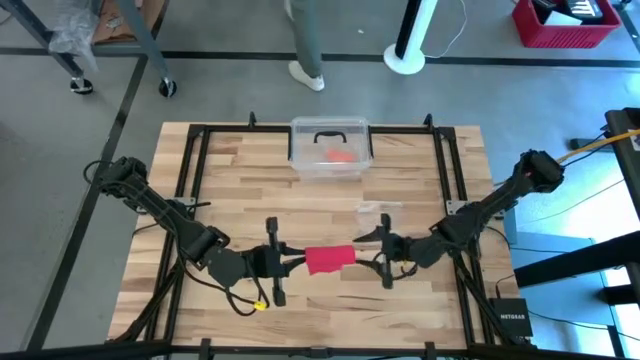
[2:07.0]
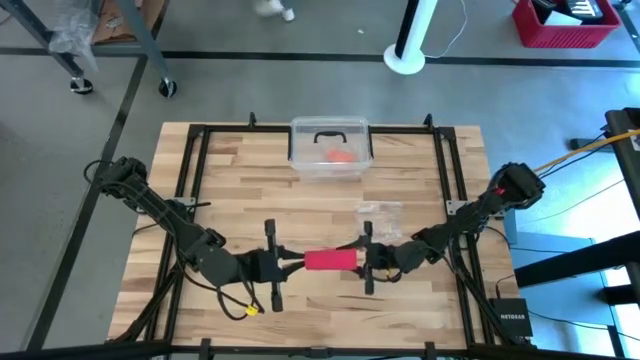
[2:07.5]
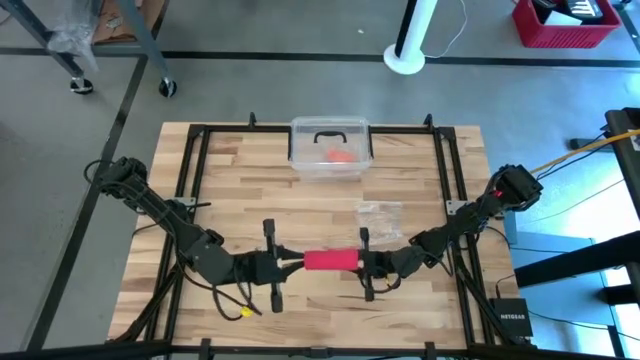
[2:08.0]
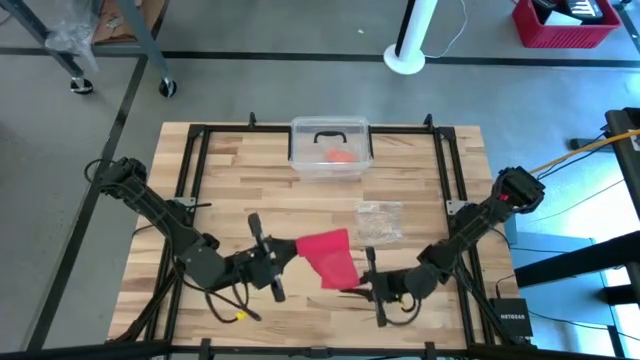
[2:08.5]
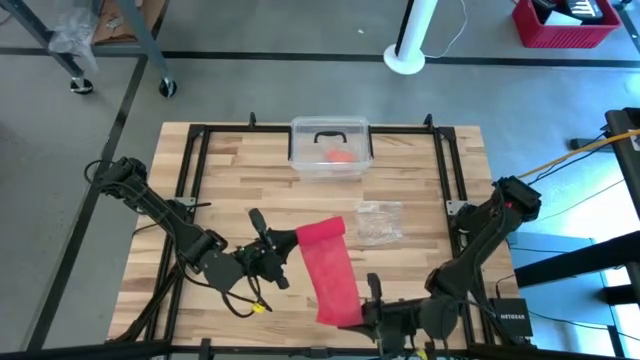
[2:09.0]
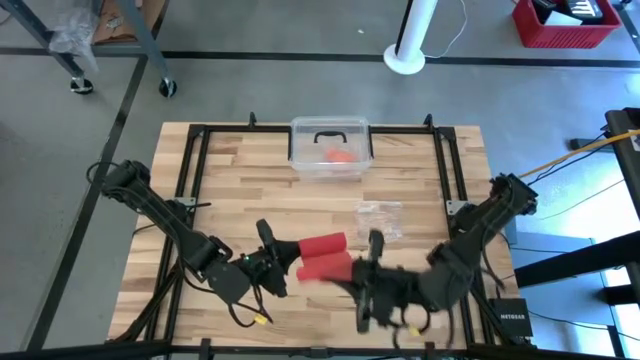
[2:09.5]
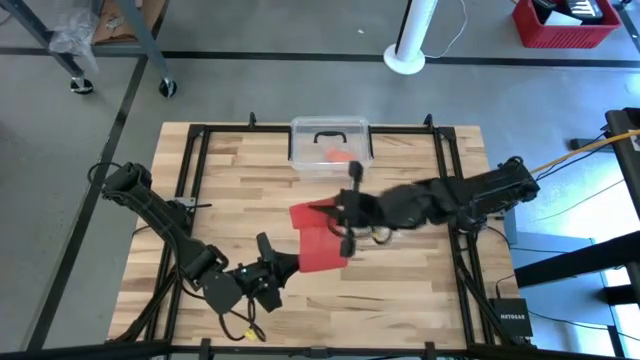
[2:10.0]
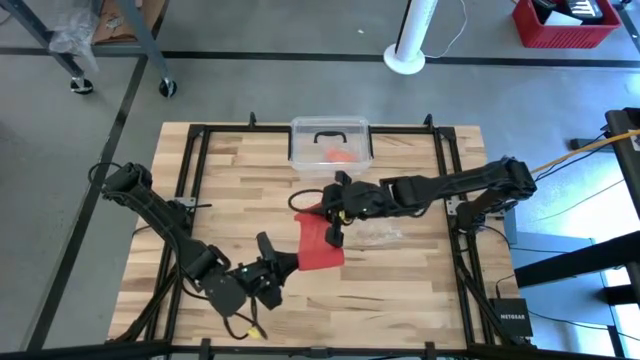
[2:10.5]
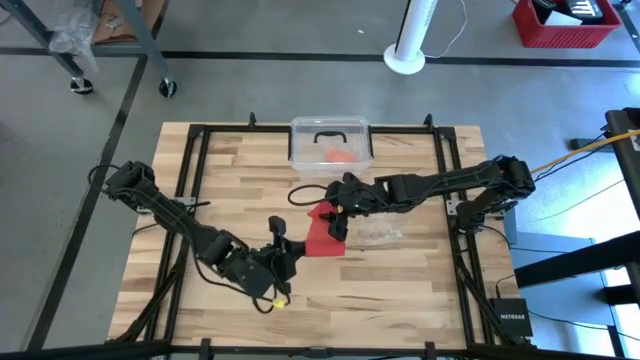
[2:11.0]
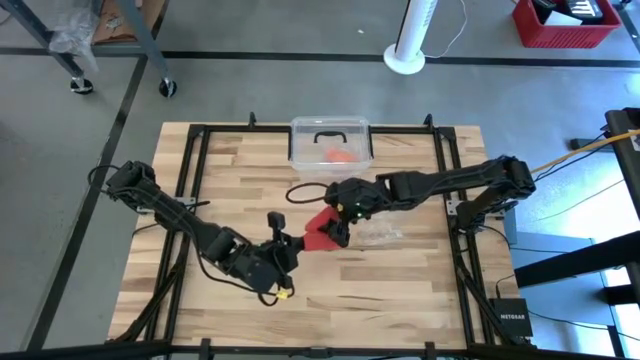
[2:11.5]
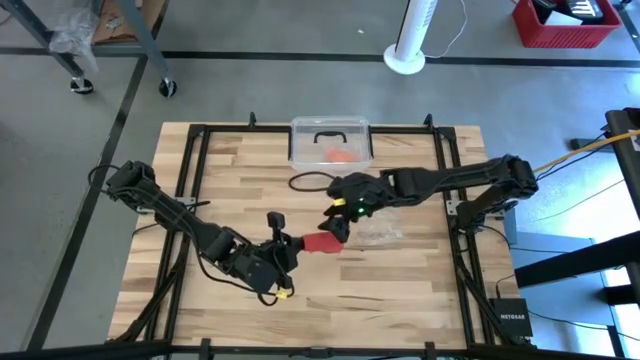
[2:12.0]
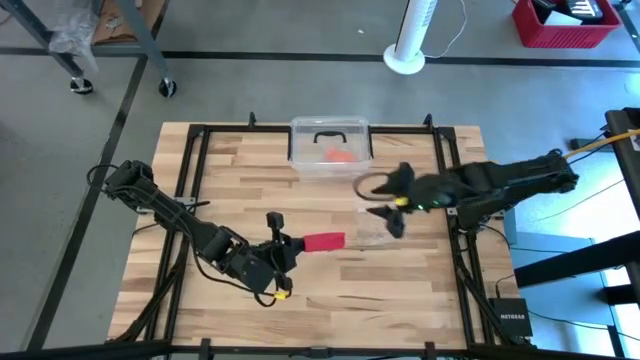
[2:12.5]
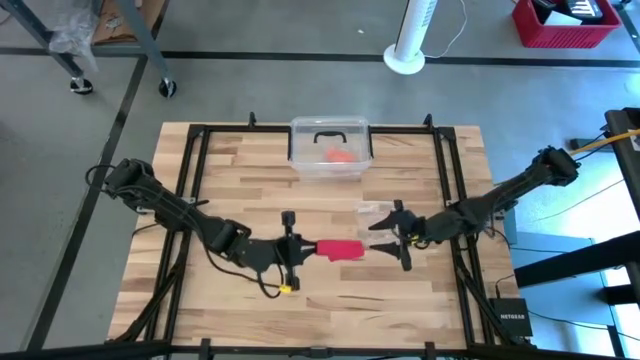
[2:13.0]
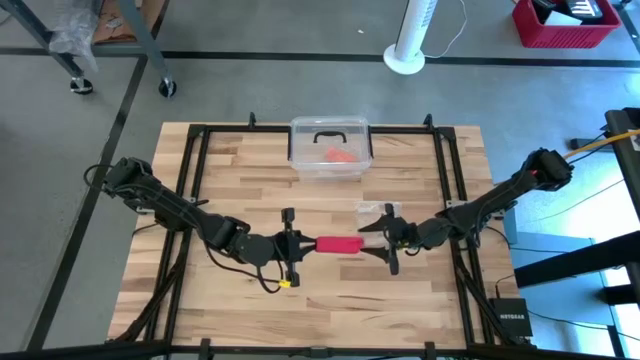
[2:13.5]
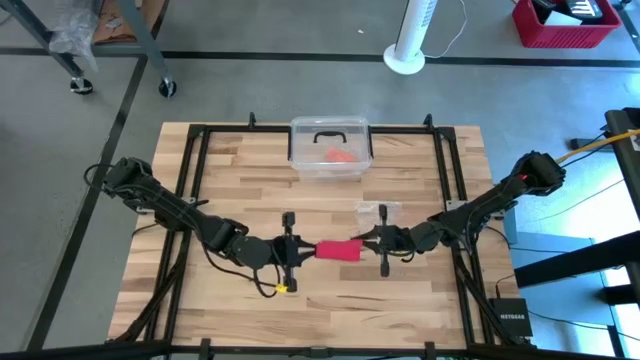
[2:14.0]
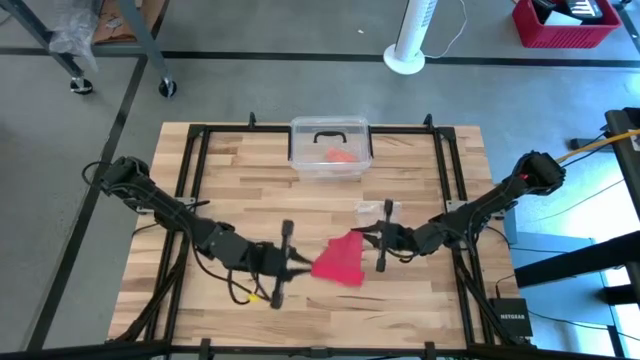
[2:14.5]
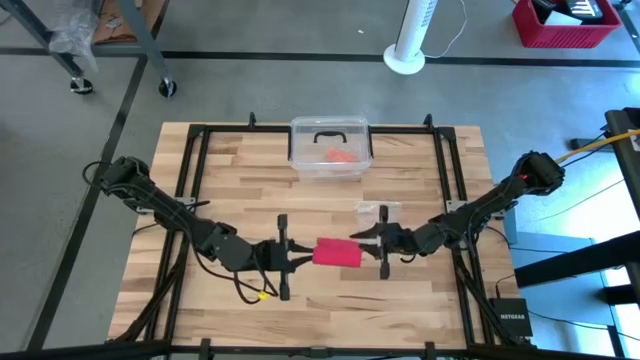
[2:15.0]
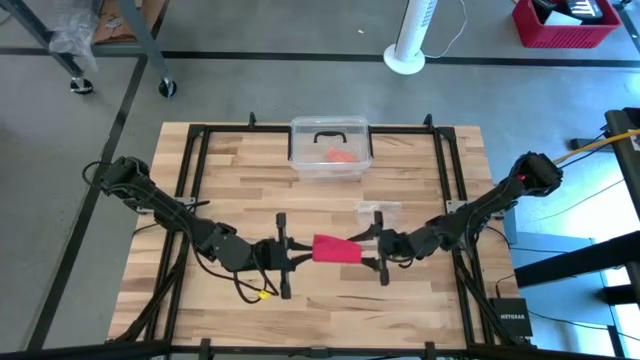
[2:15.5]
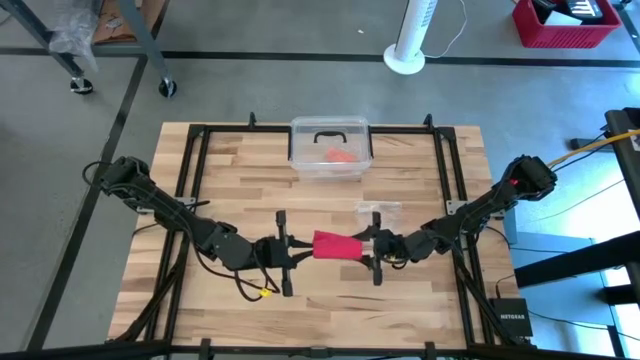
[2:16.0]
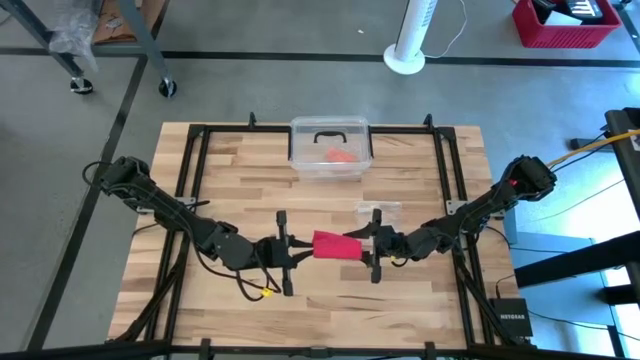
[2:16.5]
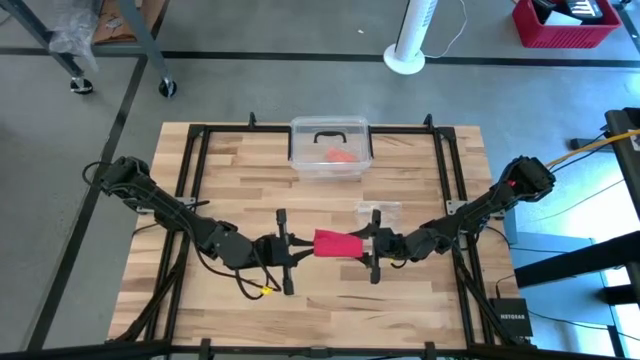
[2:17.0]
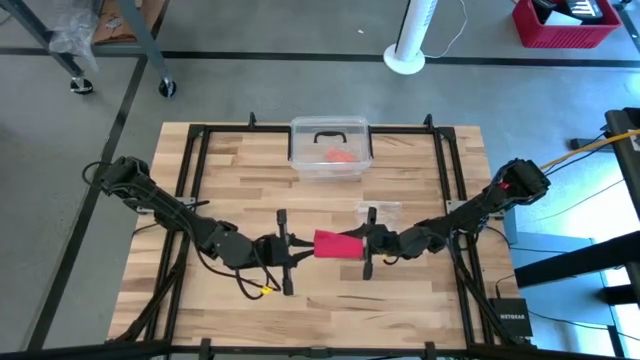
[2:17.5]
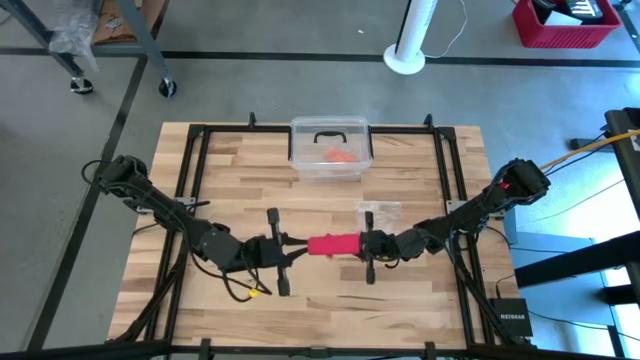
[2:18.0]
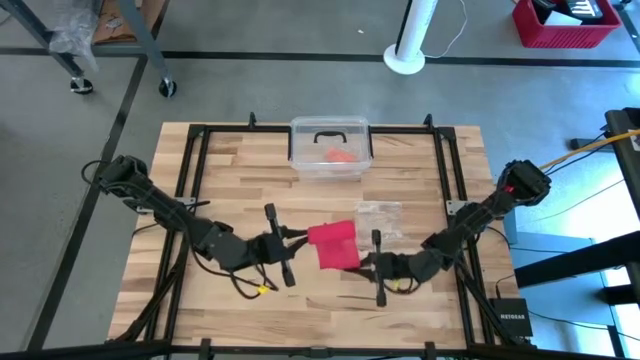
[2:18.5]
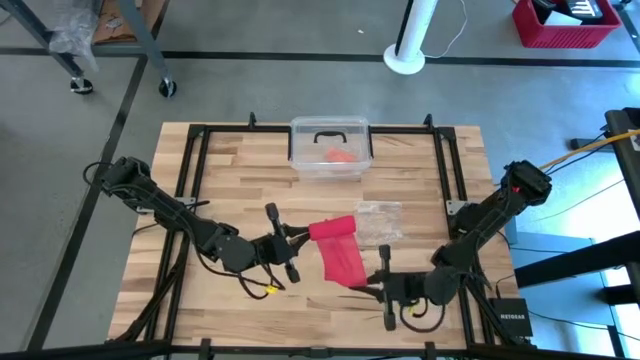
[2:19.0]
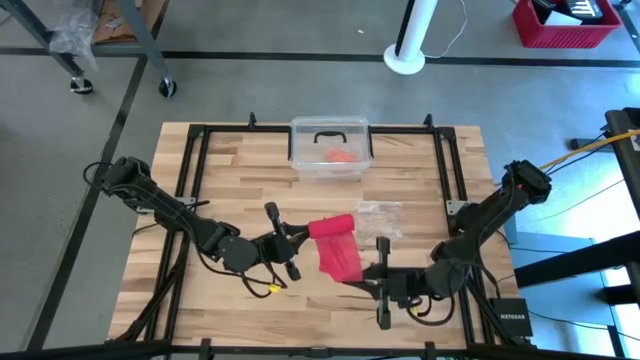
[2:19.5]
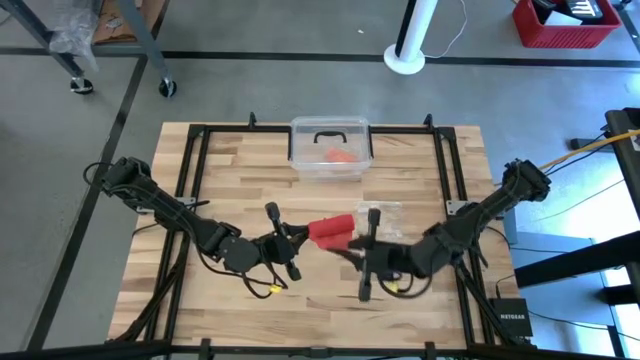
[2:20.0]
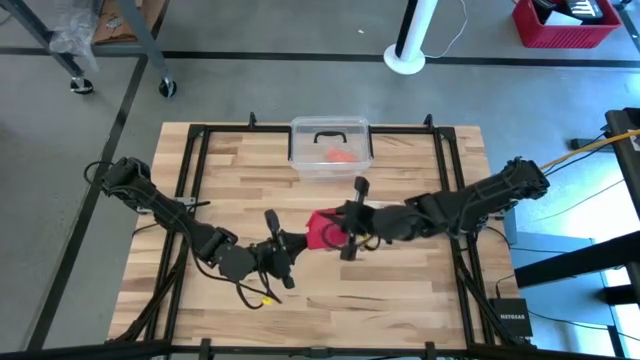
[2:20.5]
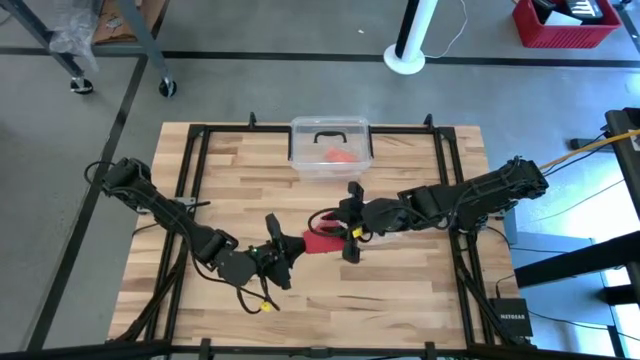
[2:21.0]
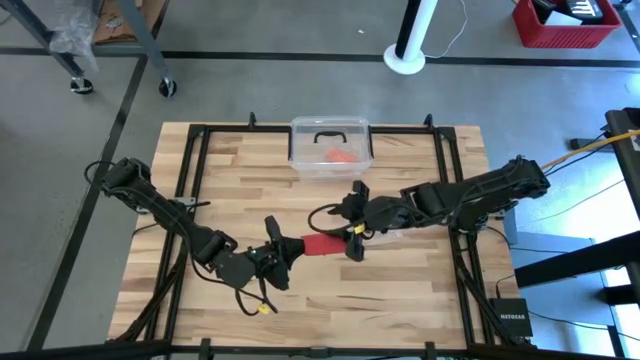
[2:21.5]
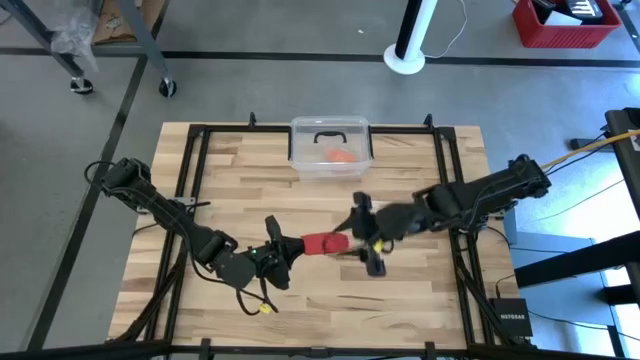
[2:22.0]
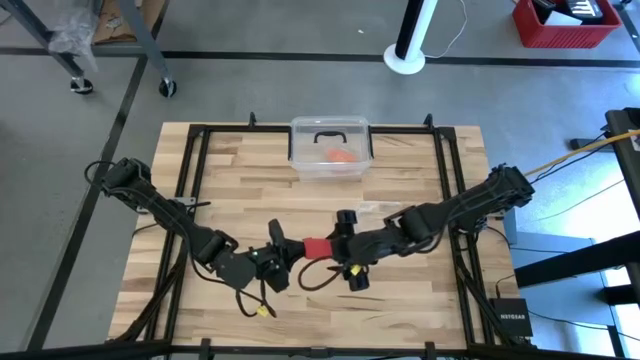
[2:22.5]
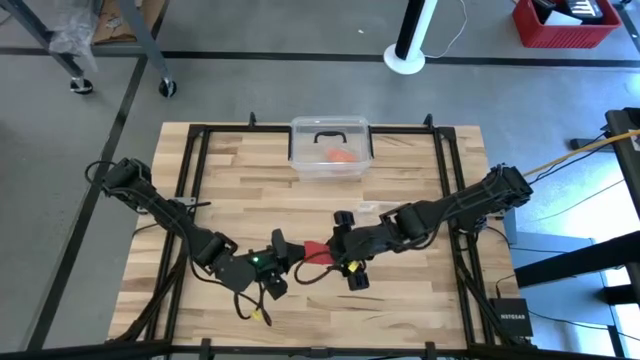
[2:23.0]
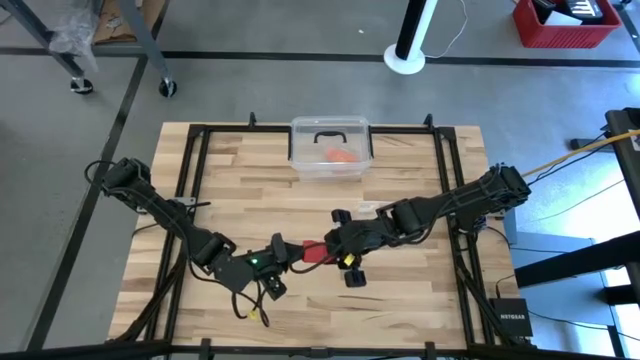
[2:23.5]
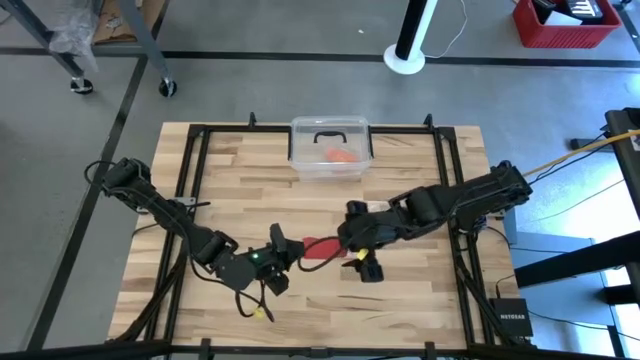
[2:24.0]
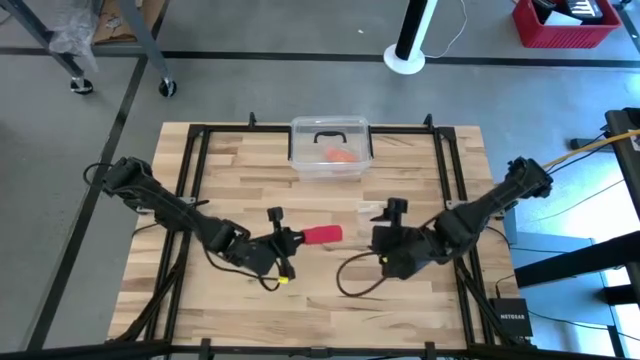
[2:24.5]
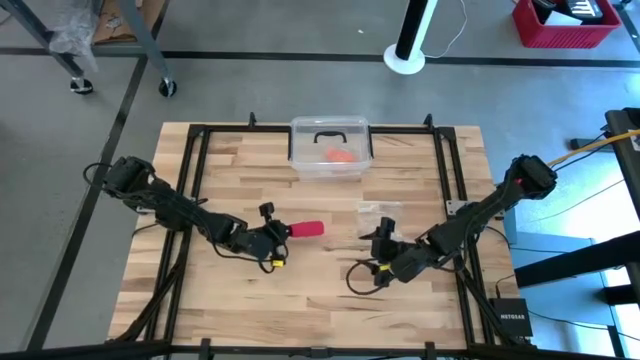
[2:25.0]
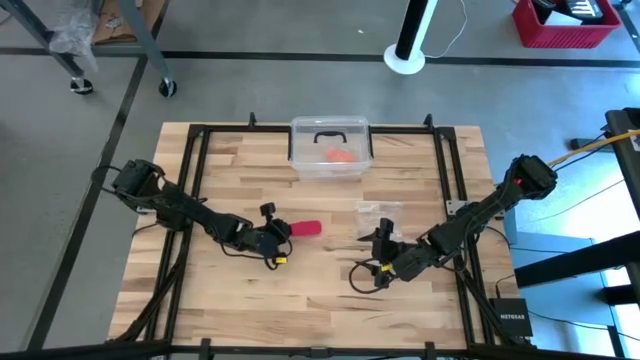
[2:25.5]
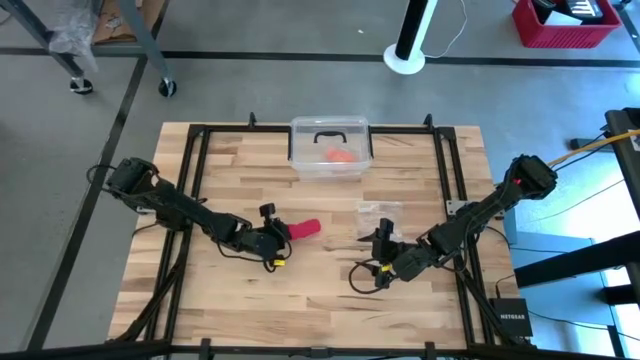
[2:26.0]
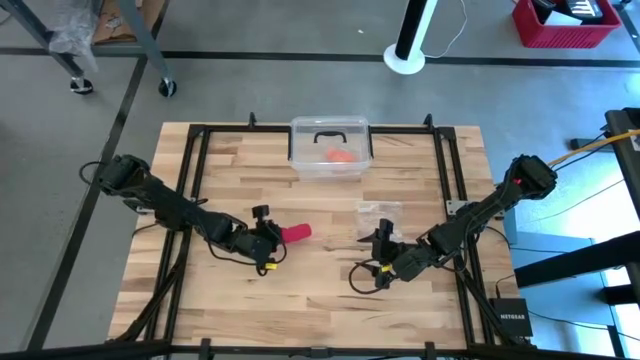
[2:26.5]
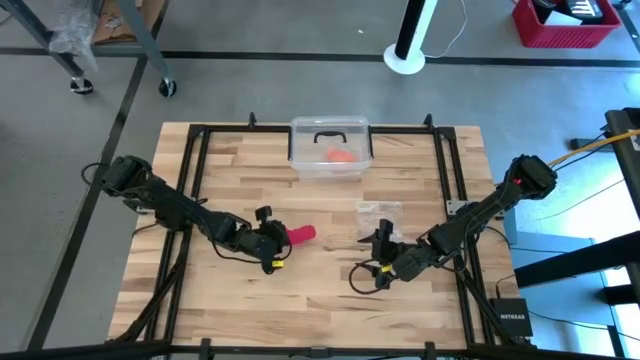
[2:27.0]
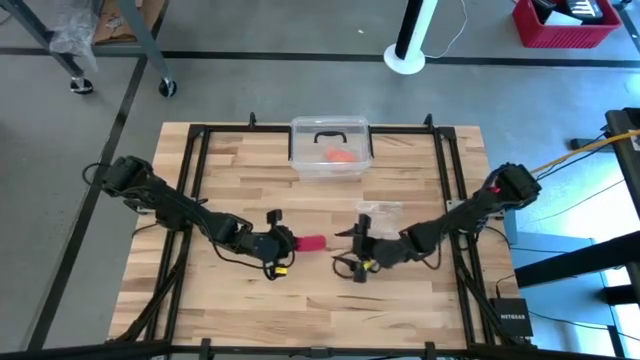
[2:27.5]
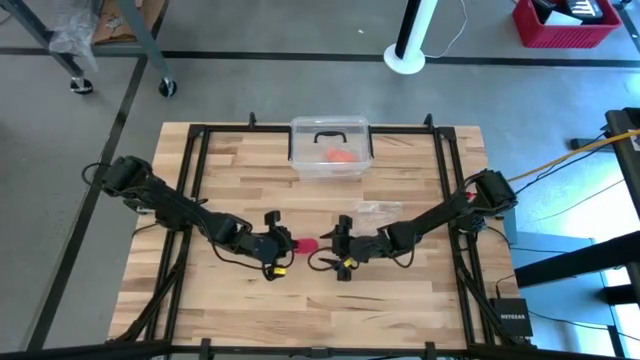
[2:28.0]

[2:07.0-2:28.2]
Task: Roll bandage
Roll the red bandage
